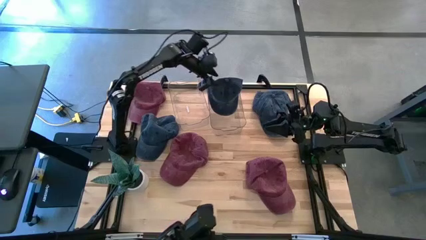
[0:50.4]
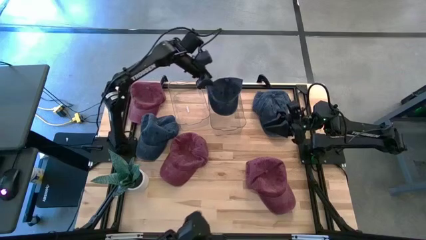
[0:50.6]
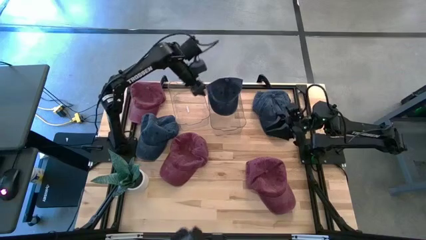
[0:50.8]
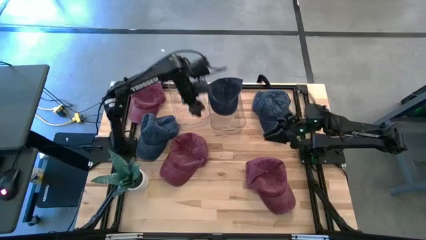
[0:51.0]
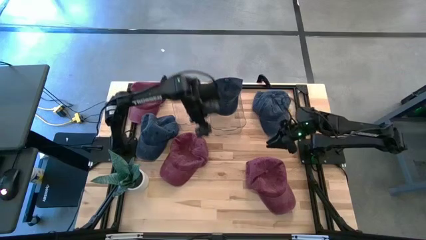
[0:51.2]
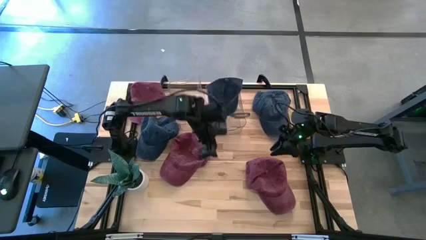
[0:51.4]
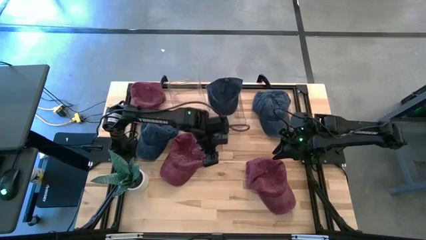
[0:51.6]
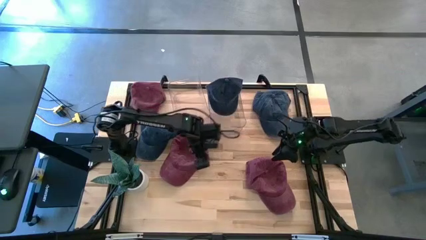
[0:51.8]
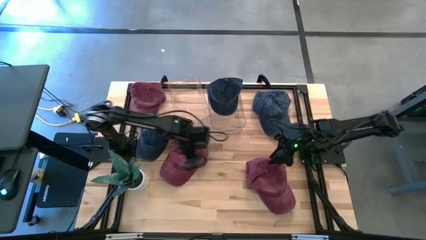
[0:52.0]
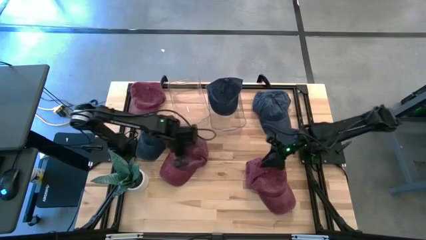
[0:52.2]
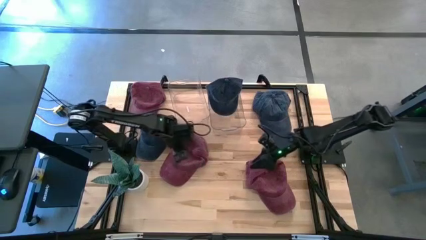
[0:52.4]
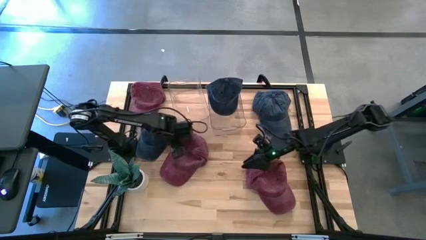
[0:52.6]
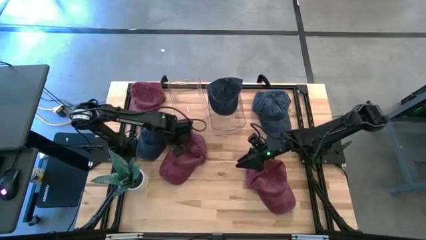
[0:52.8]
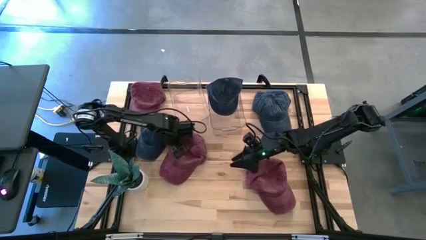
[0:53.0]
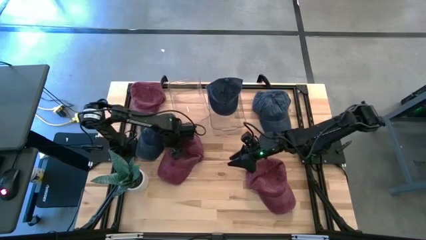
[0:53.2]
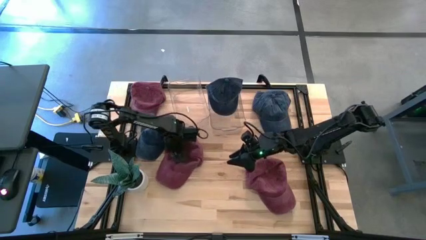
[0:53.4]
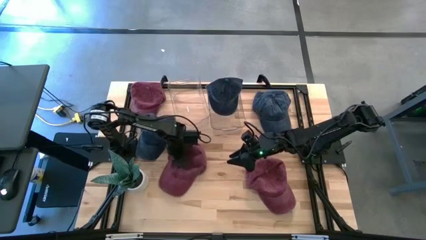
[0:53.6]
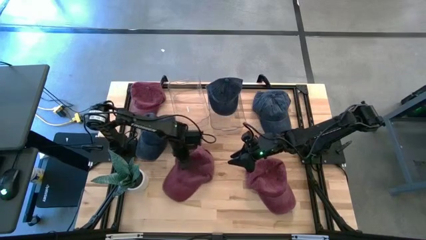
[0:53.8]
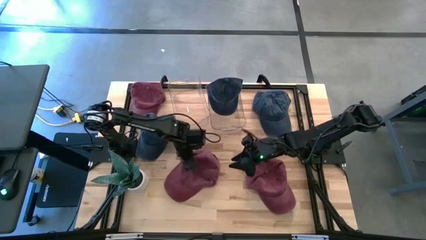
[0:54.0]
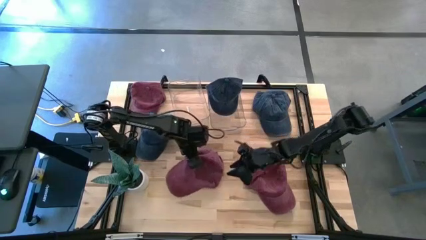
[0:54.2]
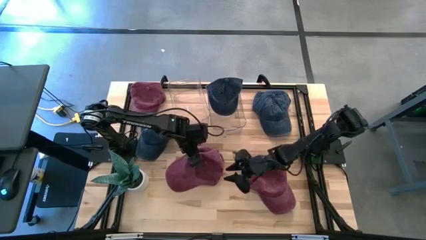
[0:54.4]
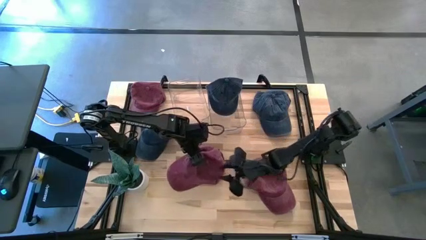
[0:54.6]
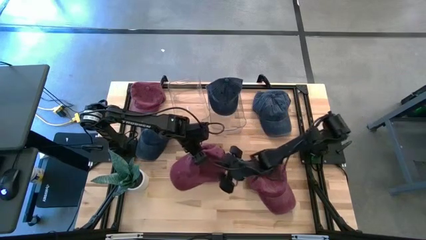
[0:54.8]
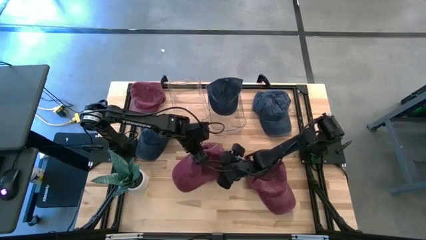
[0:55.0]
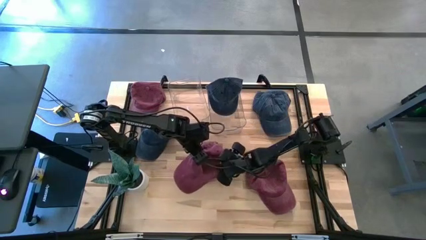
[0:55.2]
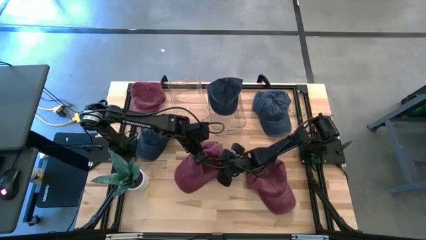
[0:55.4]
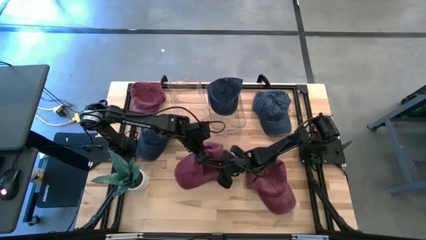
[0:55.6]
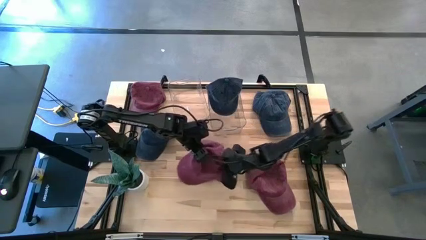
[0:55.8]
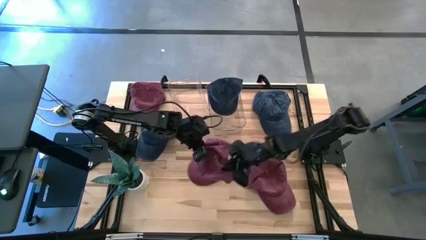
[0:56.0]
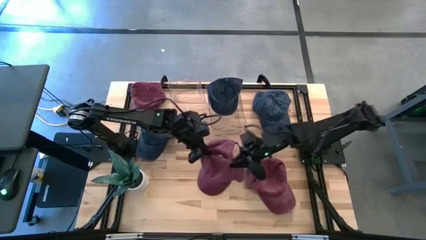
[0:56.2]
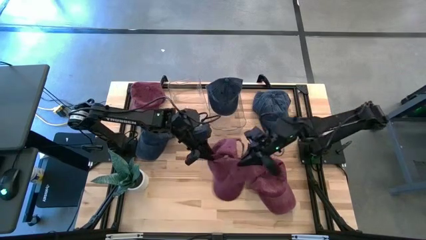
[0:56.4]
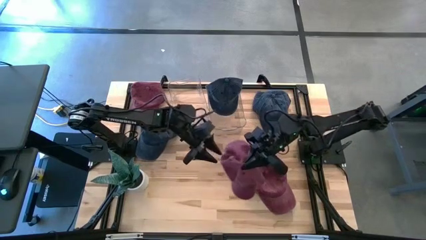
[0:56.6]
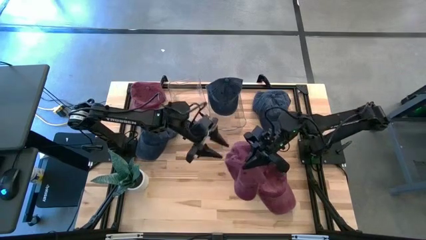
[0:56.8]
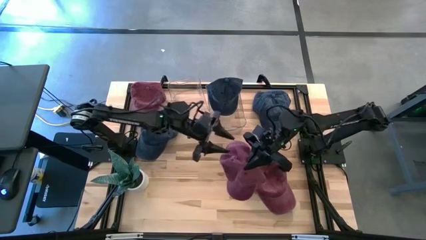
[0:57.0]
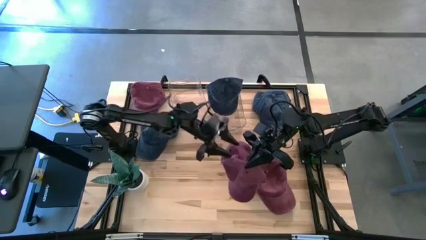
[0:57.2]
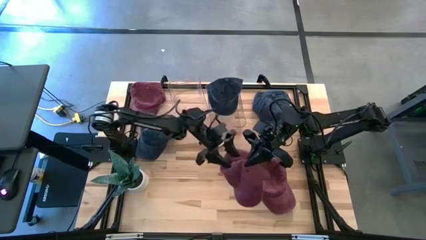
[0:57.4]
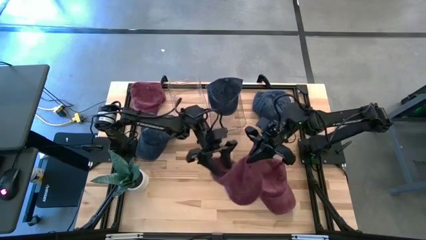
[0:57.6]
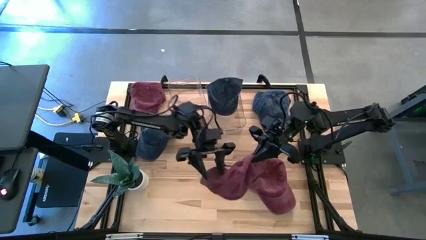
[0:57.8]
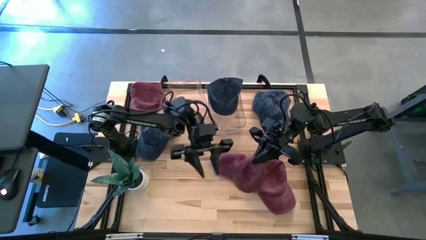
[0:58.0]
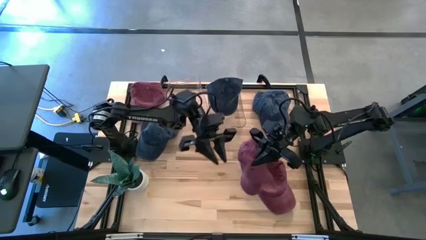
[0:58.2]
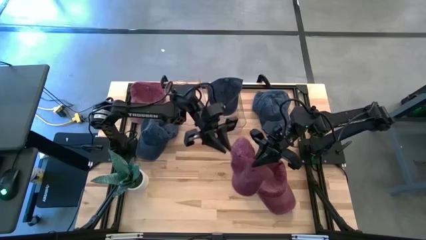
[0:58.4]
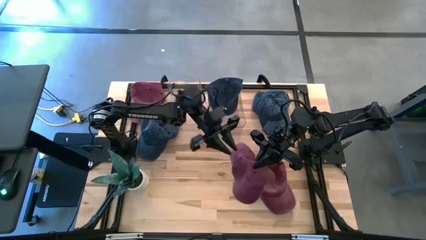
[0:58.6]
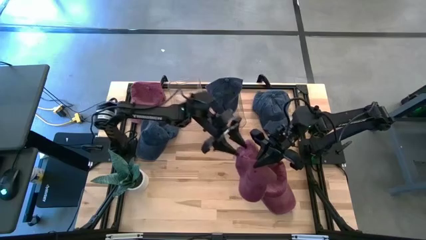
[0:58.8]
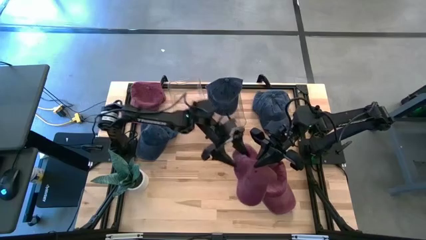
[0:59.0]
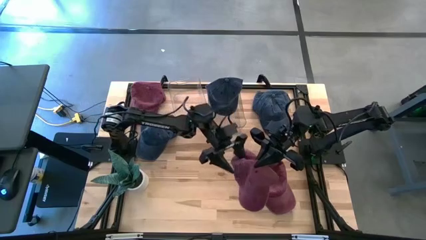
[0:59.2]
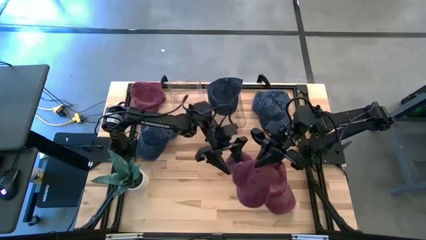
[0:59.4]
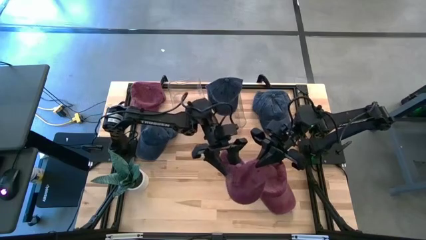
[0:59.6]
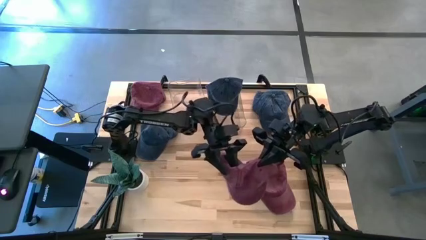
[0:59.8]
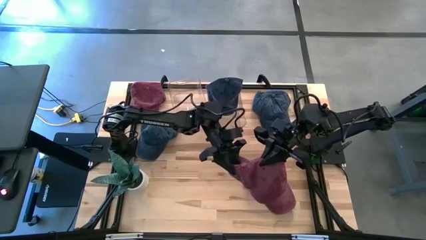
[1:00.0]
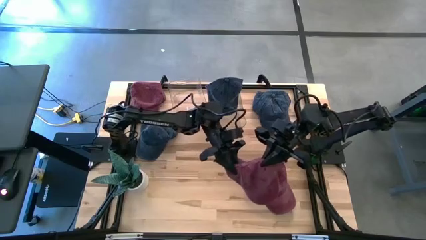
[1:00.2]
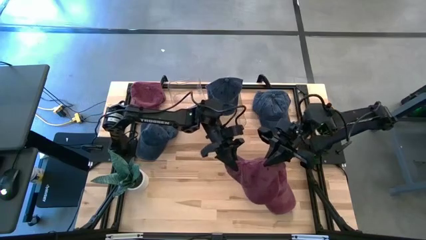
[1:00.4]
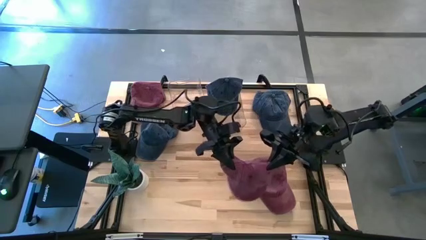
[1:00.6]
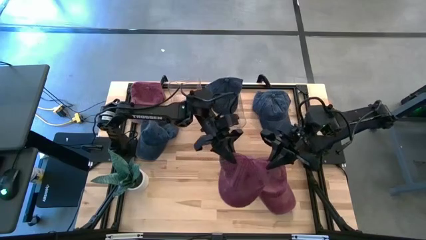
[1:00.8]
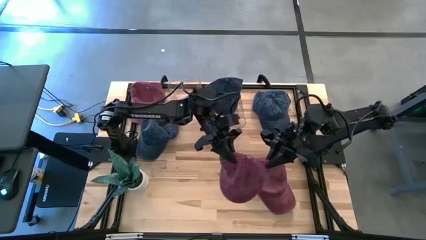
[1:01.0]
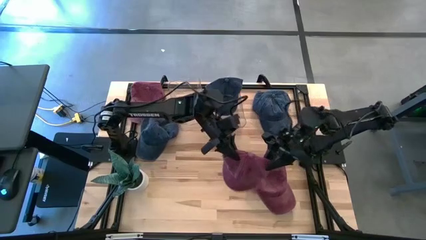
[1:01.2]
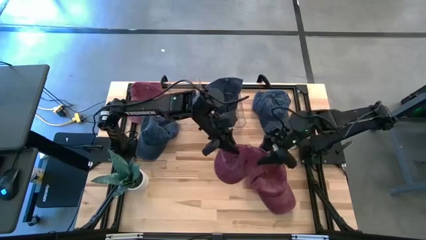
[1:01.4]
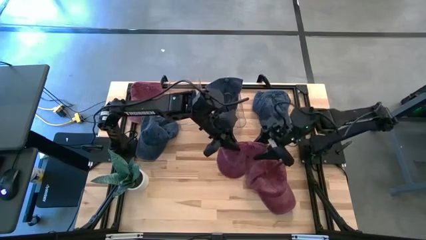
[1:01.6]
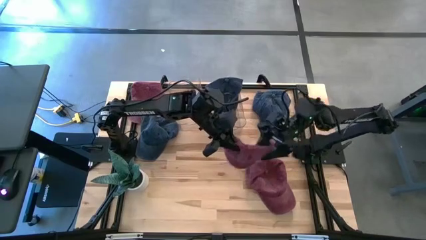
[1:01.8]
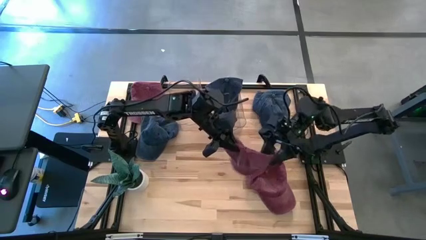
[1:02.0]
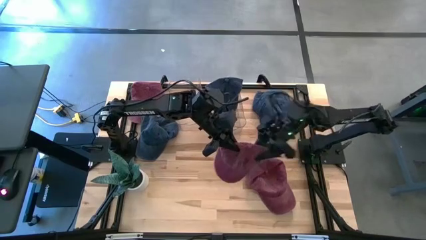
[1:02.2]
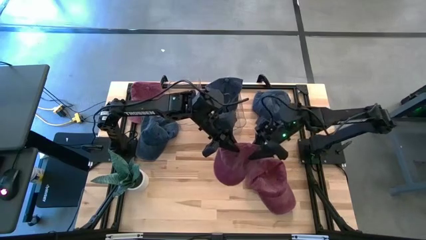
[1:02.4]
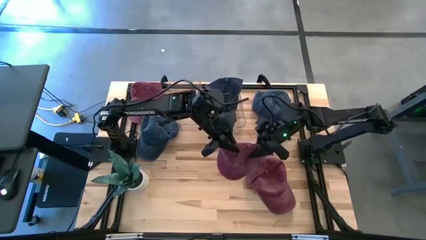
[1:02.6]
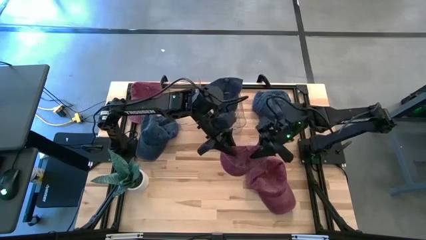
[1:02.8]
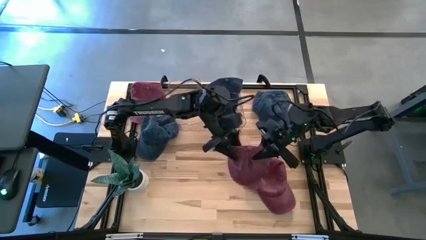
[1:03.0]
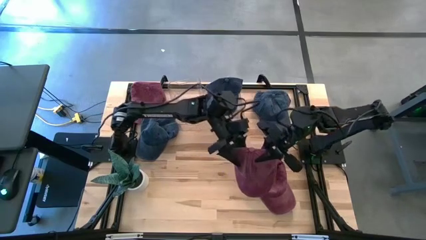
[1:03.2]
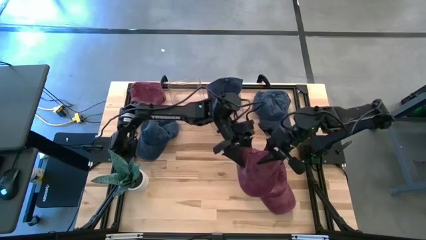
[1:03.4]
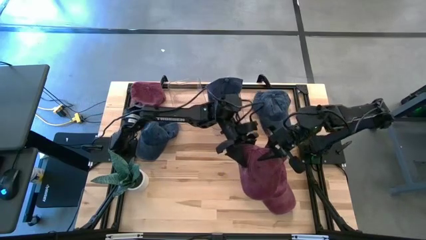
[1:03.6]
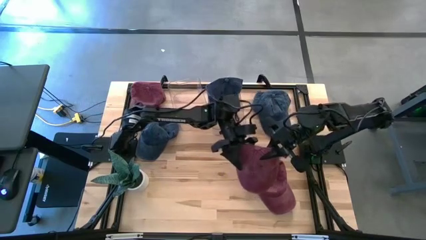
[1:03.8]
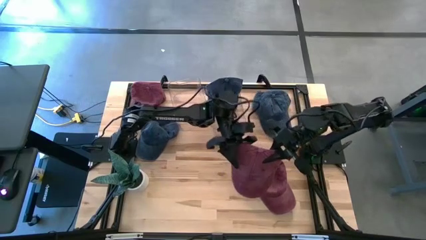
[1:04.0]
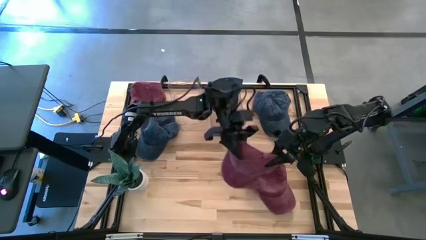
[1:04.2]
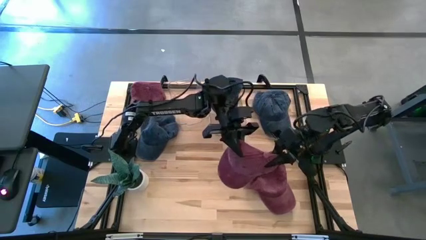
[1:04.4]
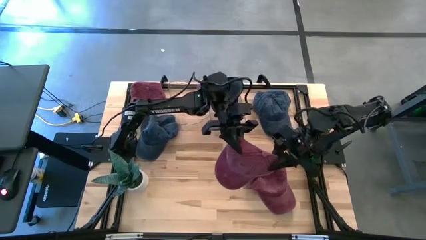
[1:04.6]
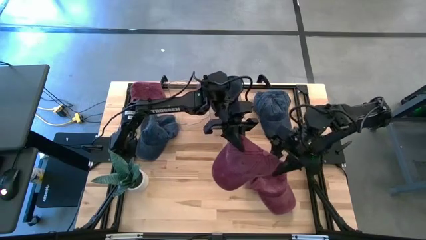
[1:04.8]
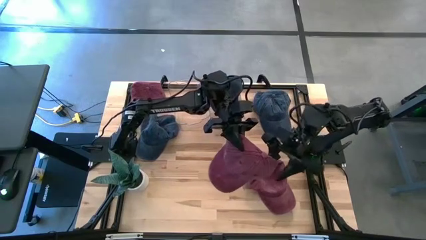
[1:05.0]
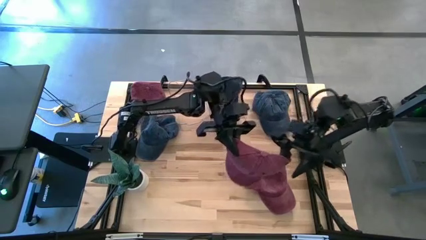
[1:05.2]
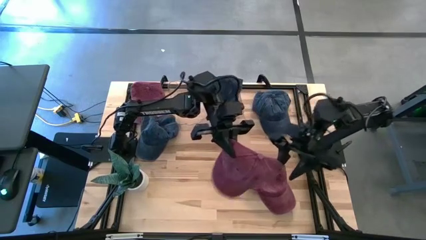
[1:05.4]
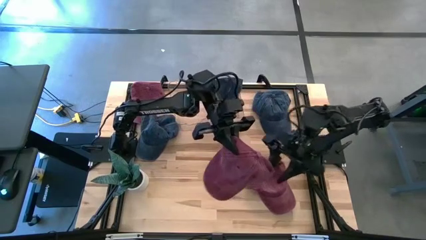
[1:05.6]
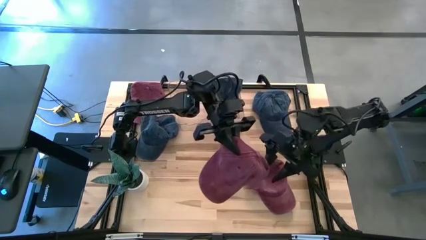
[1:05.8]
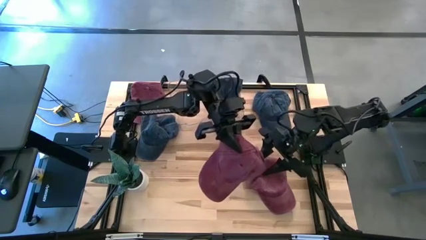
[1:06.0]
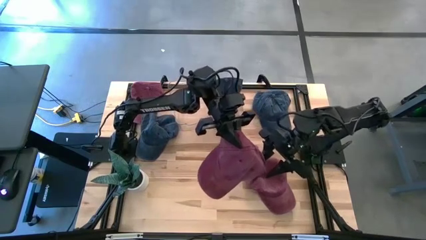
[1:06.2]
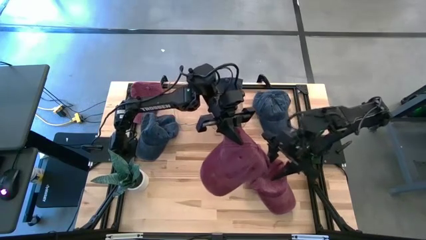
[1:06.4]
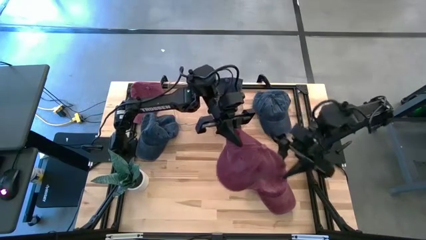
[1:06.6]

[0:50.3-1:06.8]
Task: Pick & Place hat
Put the bottom left red cap into the left bin
